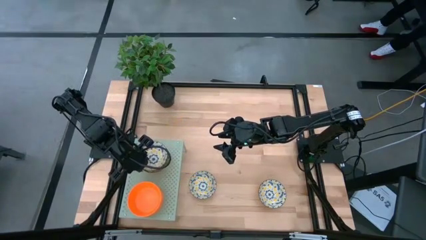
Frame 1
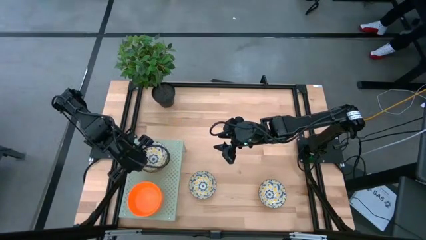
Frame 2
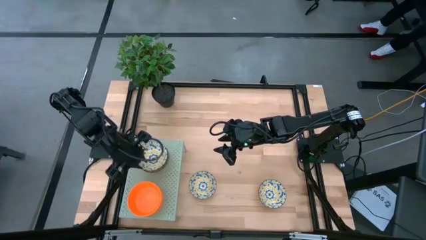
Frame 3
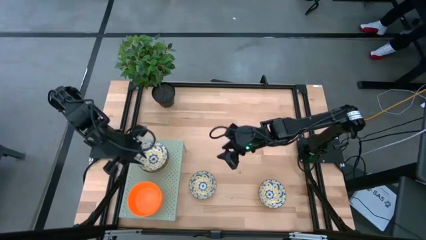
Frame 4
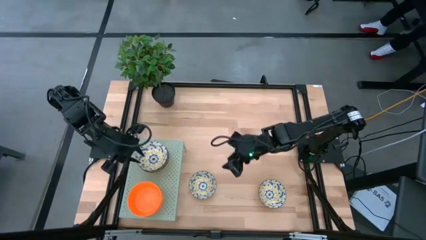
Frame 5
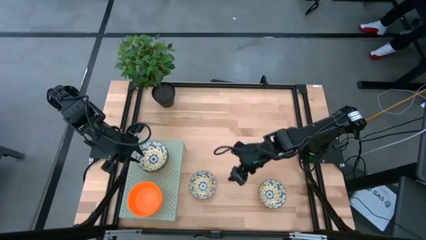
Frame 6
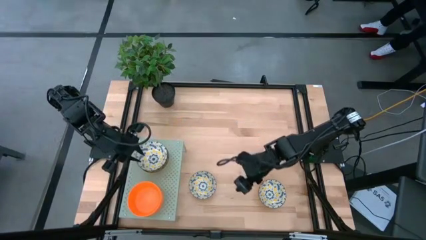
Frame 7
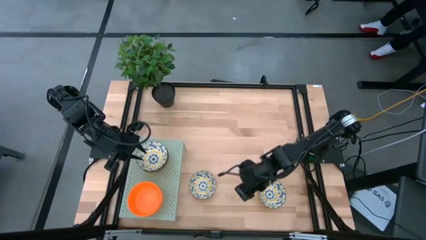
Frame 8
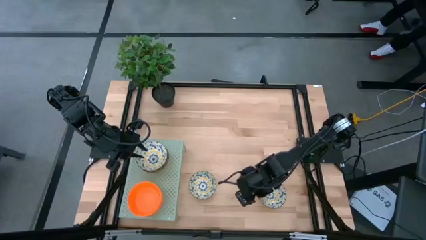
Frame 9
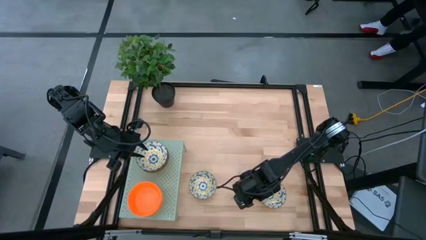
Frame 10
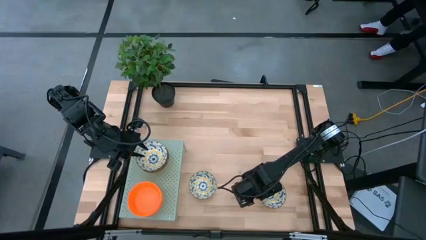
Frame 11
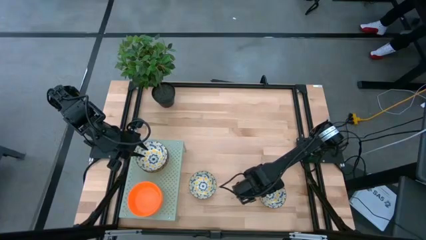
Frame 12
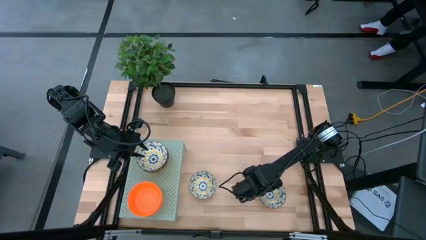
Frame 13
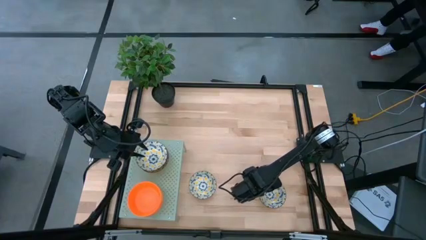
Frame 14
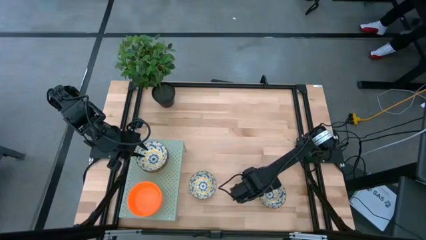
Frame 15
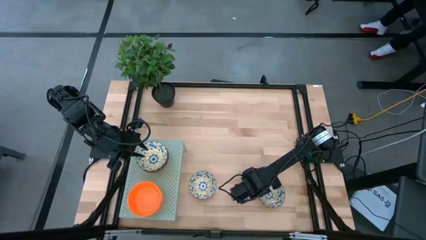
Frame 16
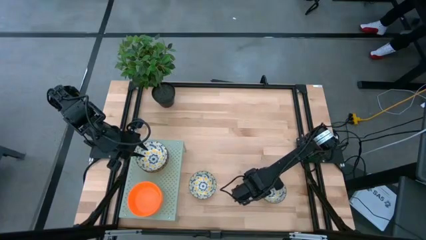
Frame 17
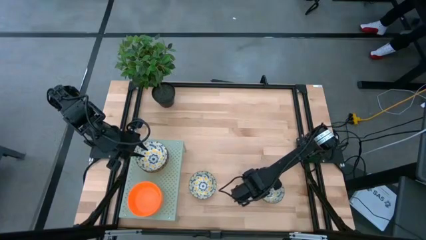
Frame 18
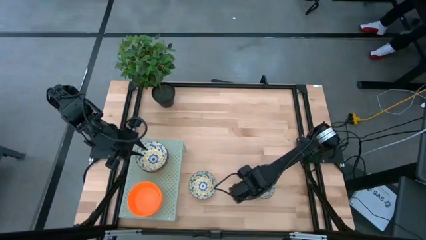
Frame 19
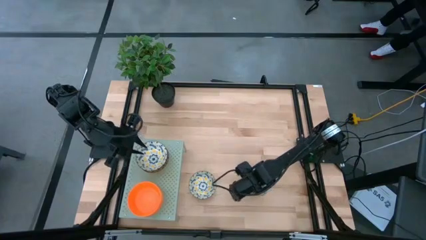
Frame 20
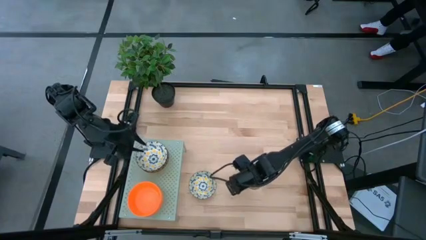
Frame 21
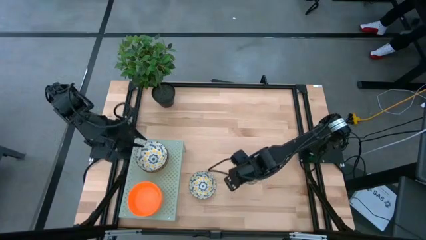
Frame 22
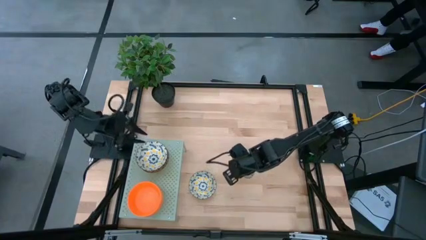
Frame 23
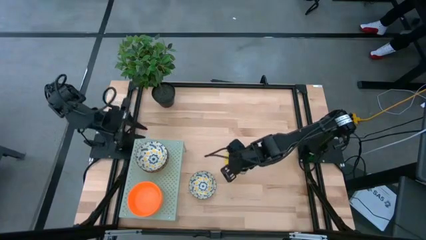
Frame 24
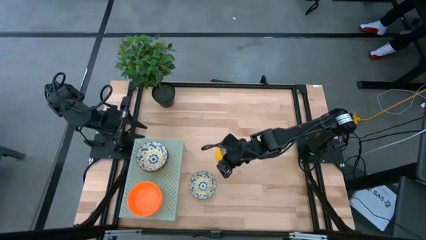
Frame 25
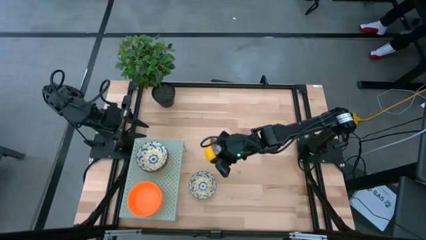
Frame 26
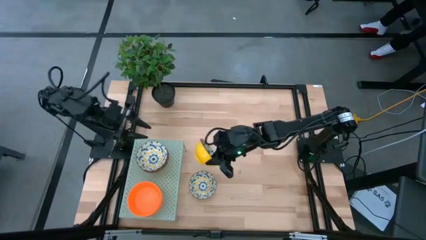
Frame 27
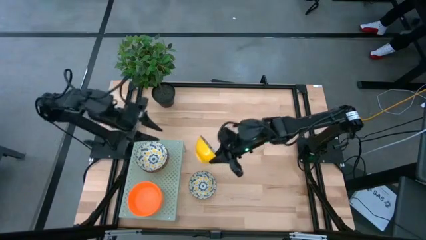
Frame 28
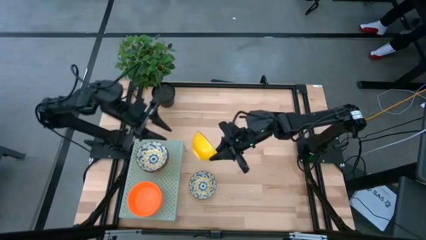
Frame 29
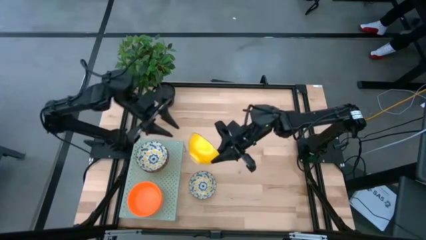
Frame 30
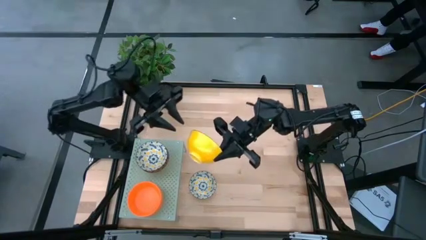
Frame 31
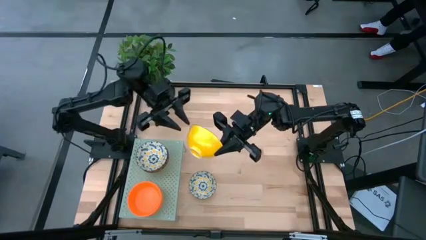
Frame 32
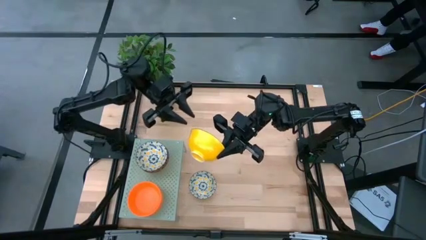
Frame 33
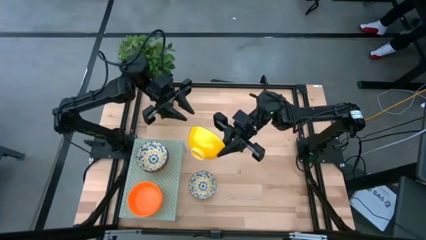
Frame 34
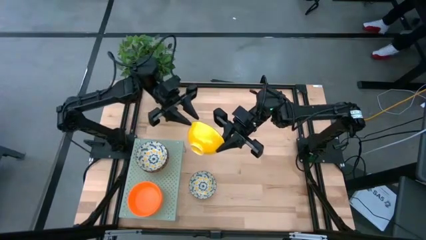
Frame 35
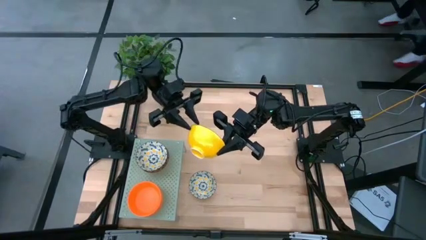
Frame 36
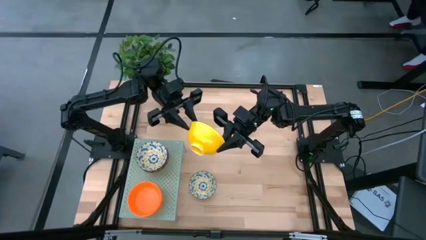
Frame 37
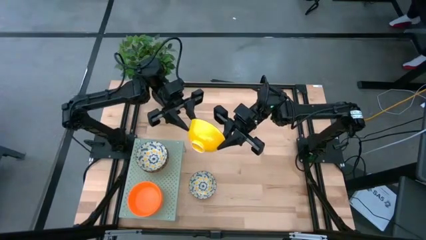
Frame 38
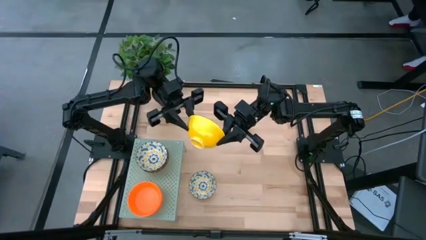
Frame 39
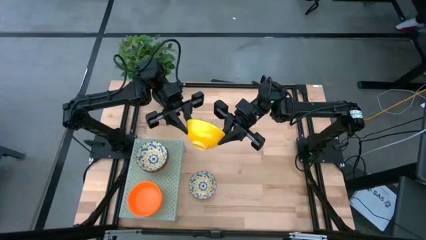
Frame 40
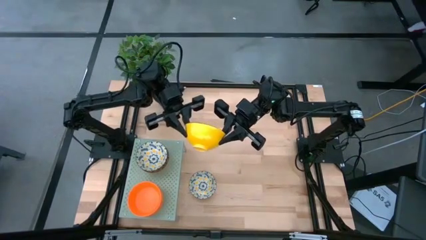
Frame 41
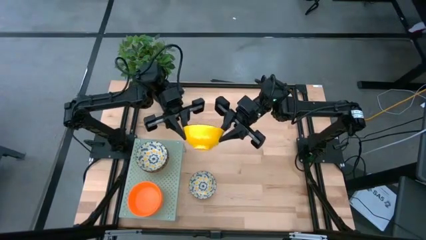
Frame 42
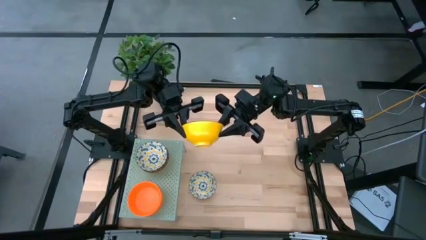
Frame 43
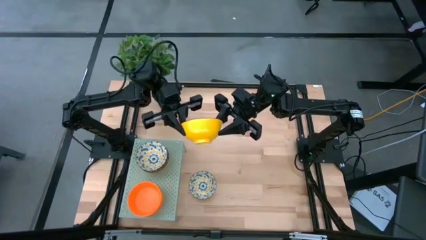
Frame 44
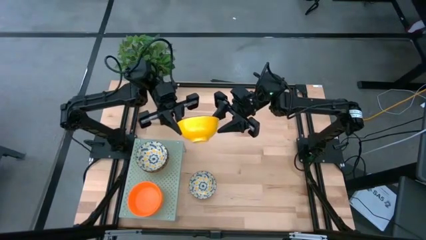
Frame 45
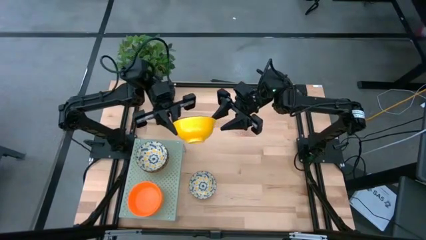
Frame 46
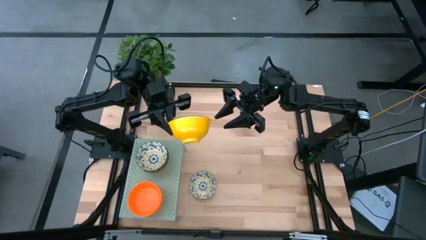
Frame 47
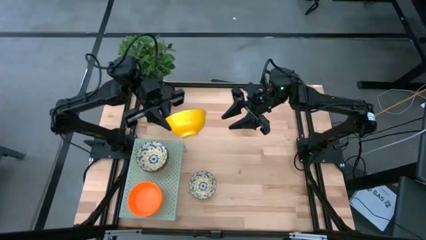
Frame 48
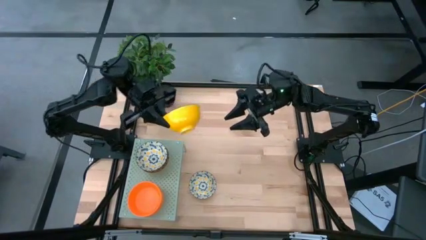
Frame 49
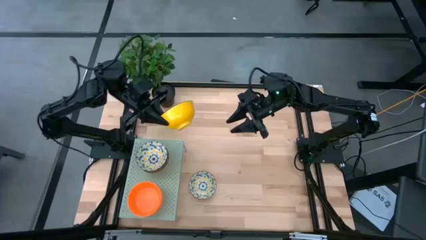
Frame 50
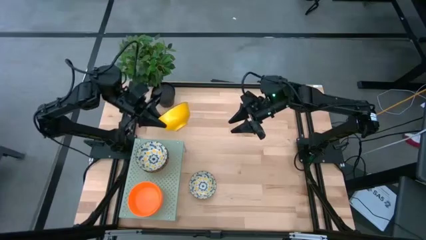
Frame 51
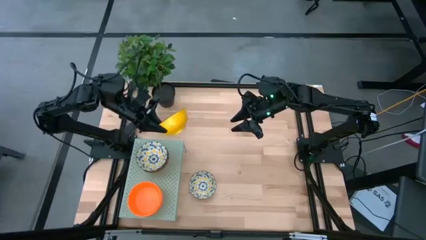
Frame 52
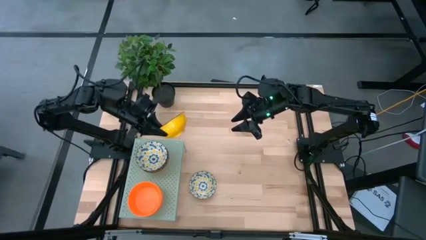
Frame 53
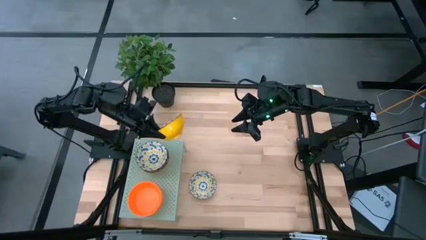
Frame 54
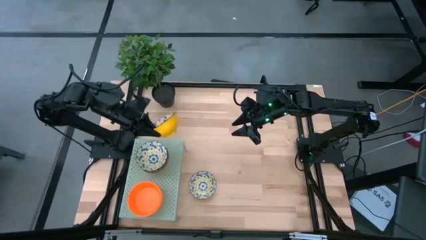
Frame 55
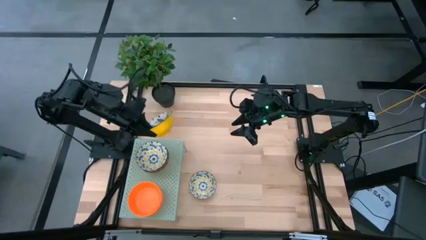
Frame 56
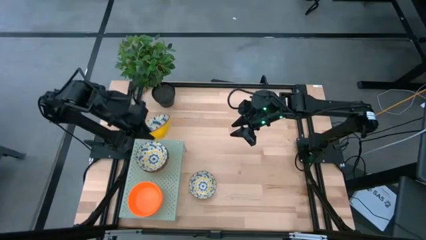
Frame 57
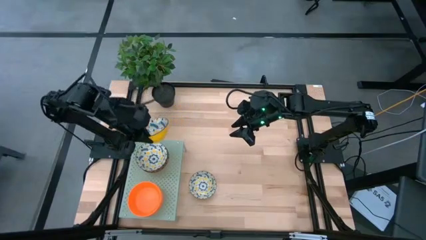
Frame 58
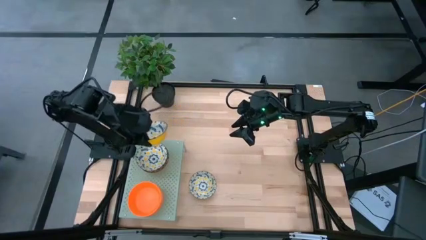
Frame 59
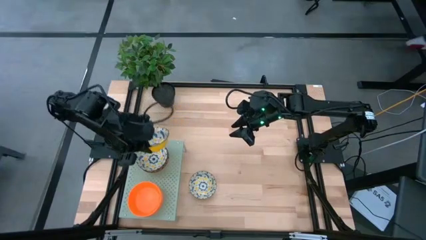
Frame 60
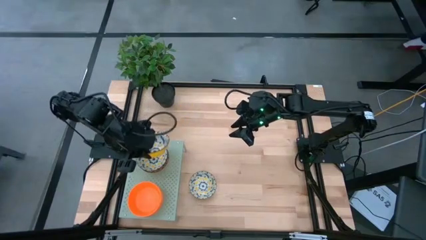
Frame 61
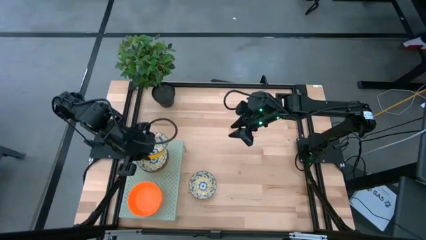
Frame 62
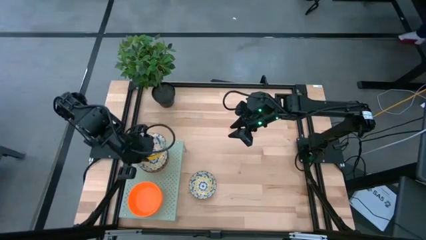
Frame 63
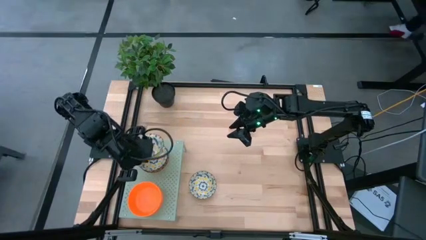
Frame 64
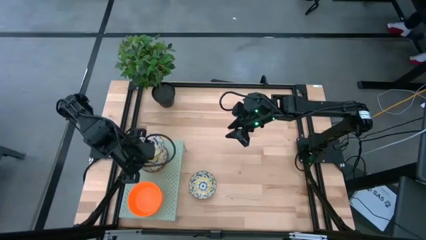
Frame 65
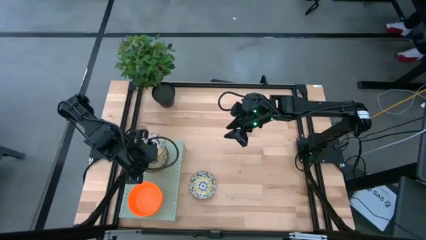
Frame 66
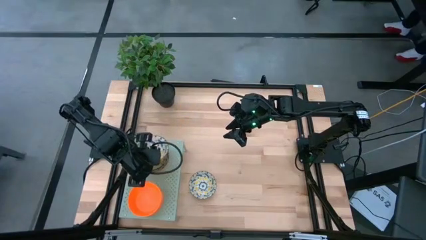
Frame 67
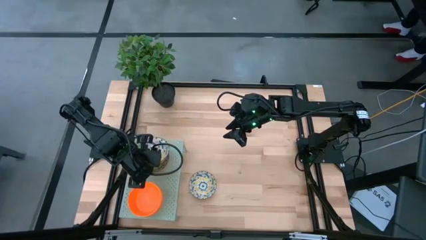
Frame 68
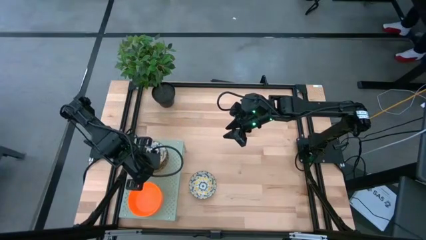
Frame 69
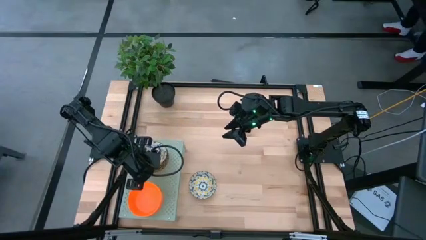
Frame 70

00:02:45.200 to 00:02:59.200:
Task: Pick & Place Mini bowls
Stack the patterned bowl on top of the patterned bowl on the shelf

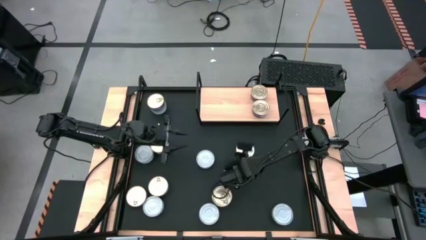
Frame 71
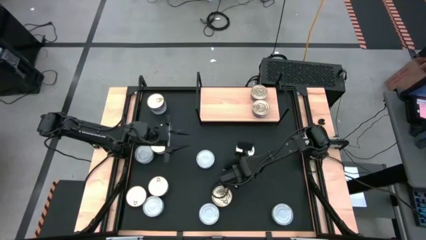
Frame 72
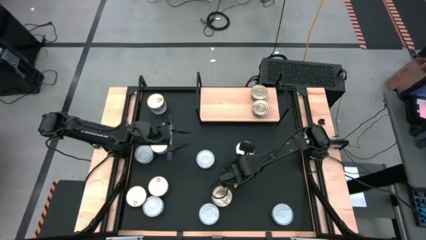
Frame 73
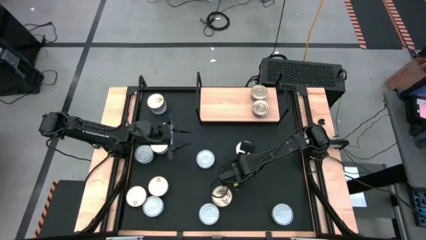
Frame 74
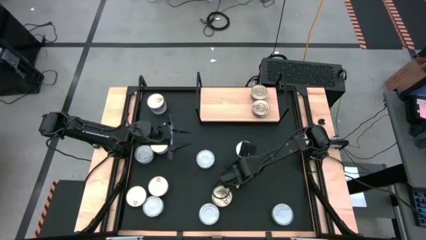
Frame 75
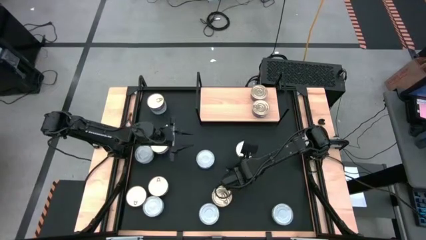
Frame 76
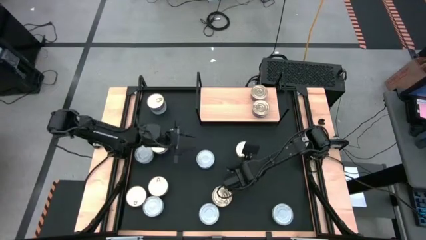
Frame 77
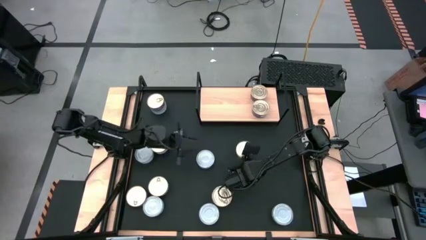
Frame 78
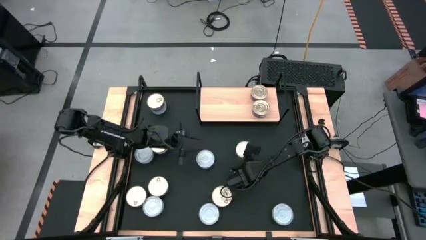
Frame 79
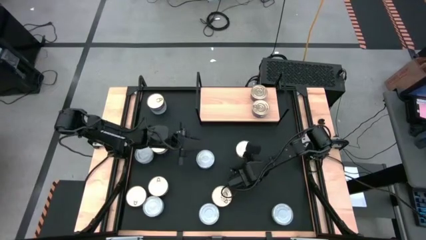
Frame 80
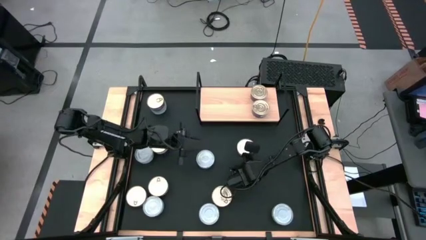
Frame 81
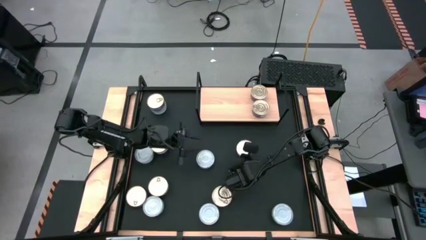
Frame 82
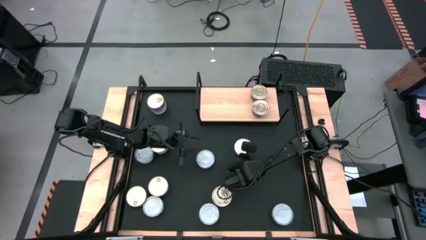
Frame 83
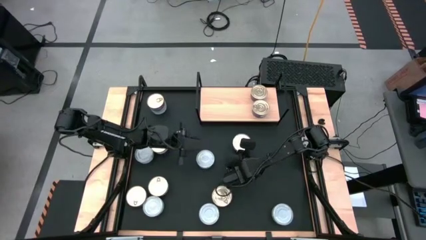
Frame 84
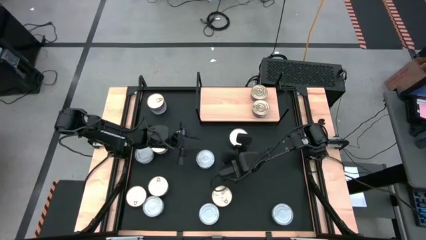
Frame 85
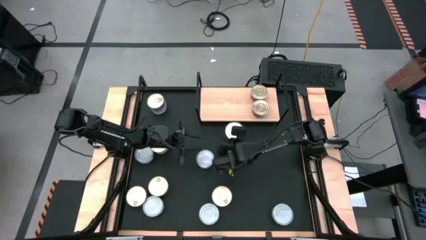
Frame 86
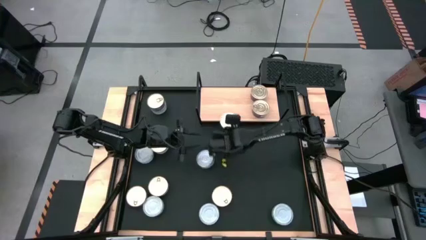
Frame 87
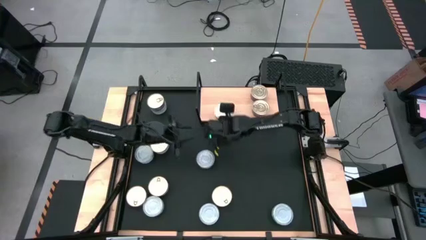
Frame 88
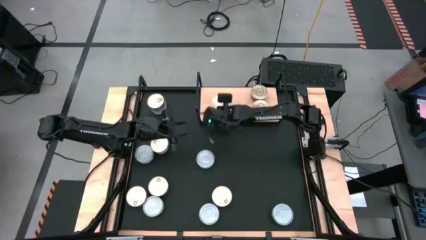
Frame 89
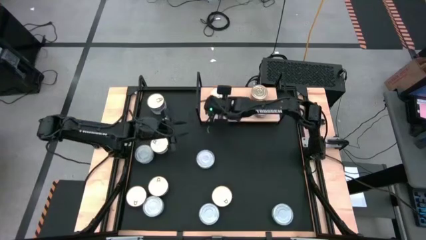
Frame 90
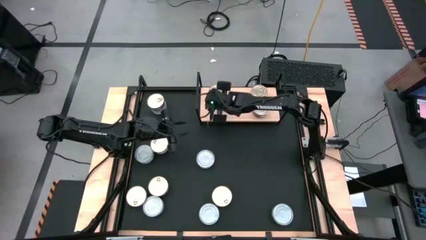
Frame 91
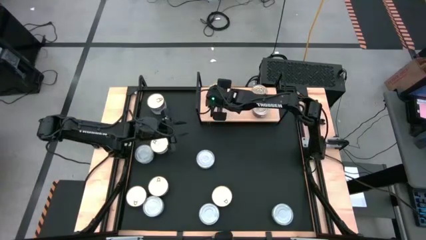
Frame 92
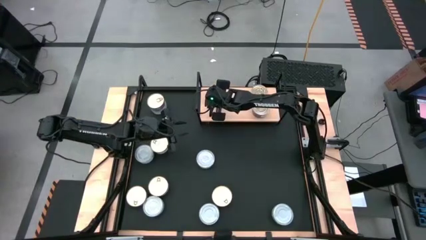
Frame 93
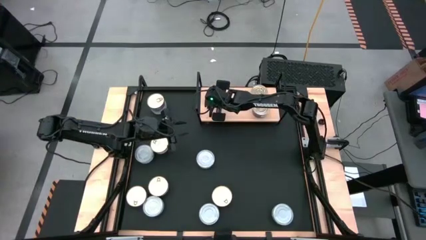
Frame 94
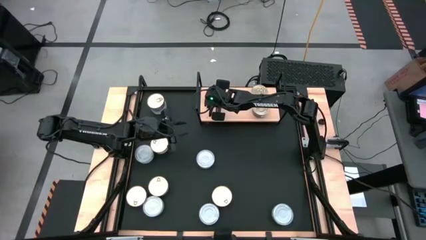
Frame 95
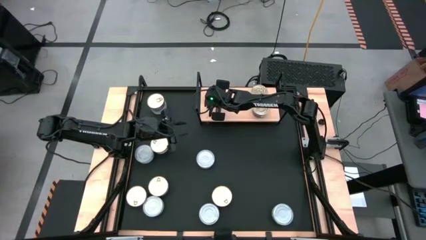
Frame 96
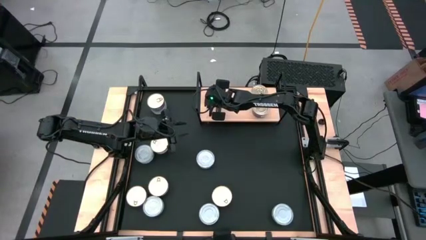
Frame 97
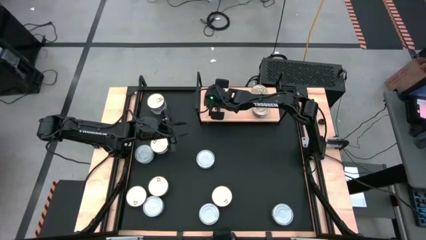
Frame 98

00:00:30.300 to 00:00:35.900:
Task: Stack canned seafood by type on shelf
Put the blue pink tuna can on the left of the shelf
